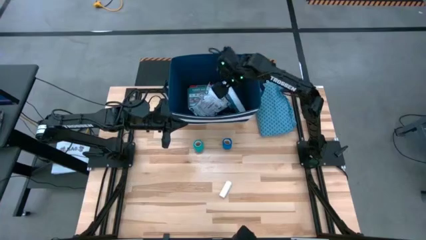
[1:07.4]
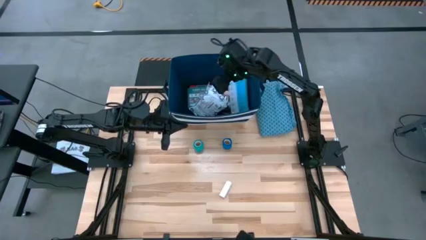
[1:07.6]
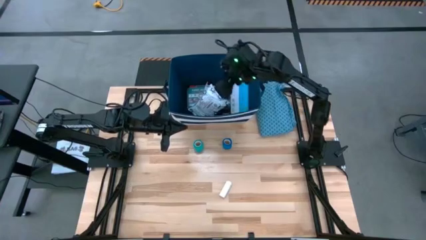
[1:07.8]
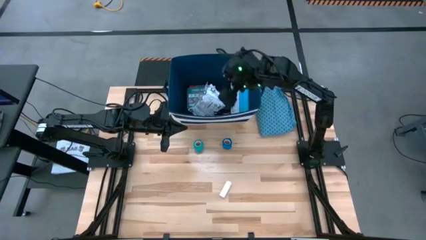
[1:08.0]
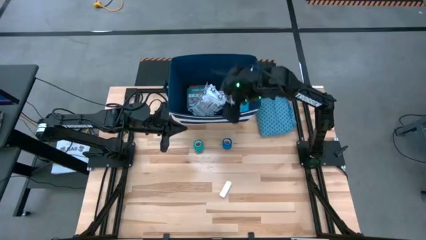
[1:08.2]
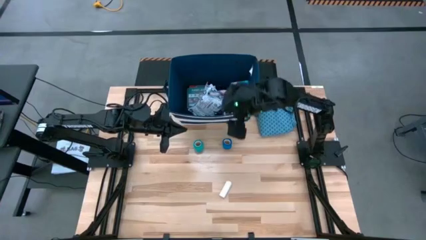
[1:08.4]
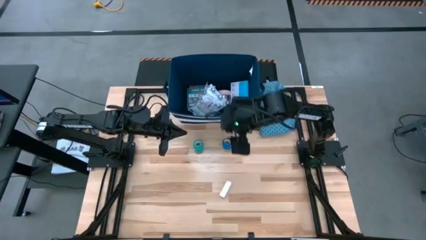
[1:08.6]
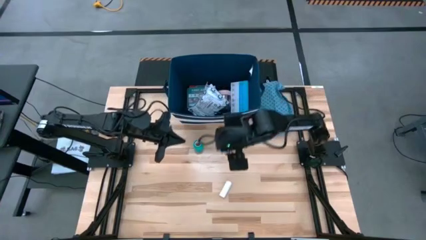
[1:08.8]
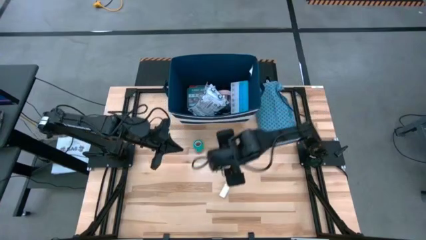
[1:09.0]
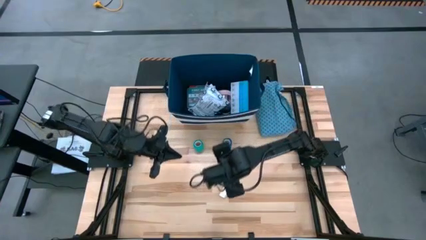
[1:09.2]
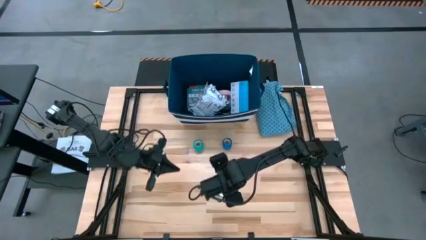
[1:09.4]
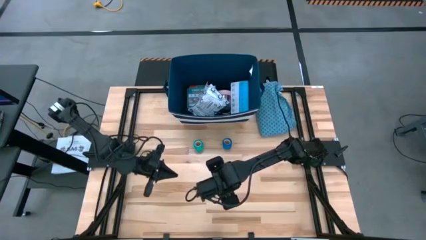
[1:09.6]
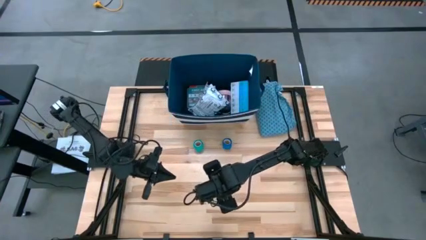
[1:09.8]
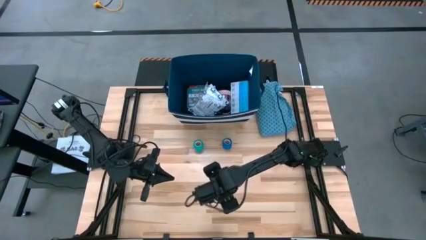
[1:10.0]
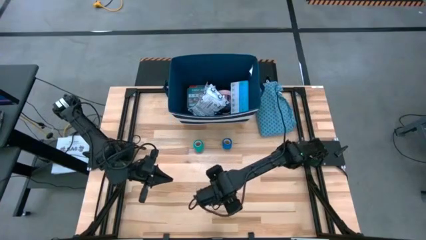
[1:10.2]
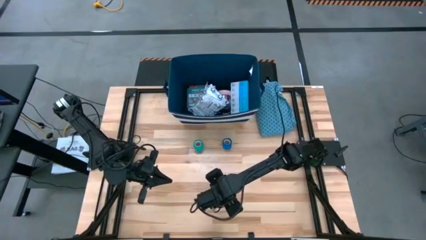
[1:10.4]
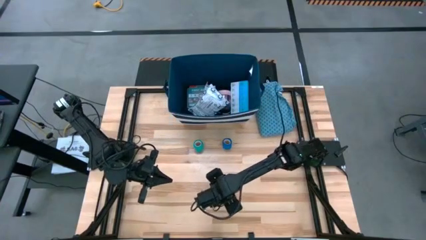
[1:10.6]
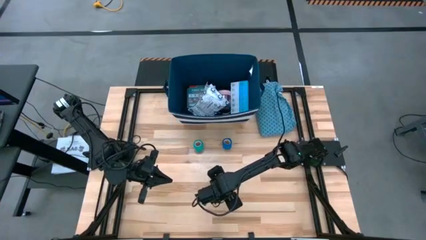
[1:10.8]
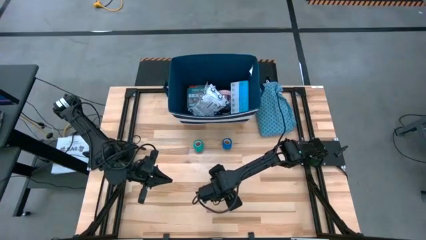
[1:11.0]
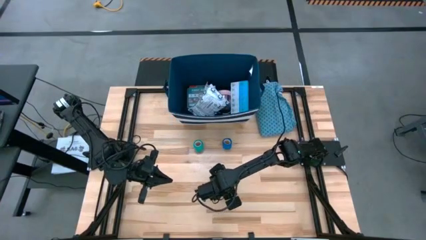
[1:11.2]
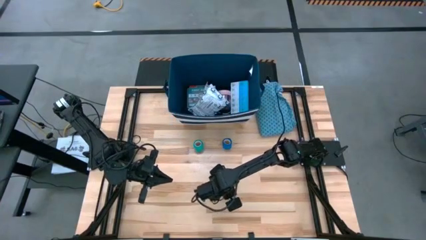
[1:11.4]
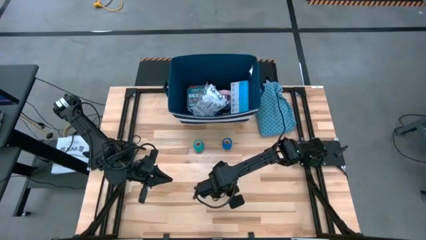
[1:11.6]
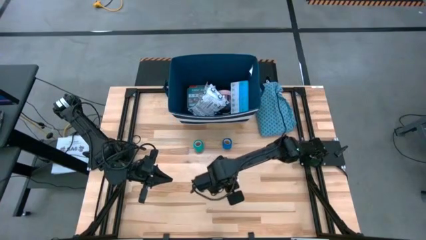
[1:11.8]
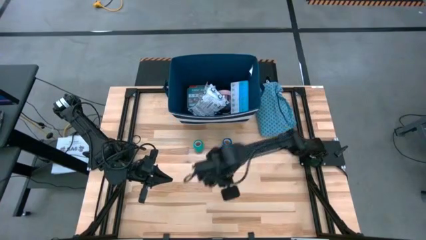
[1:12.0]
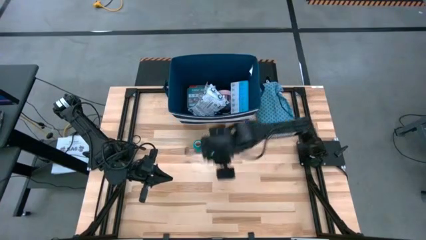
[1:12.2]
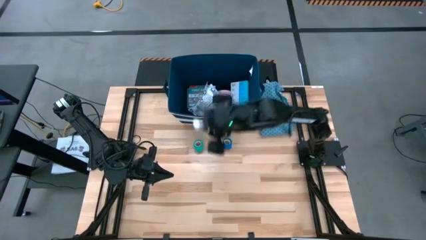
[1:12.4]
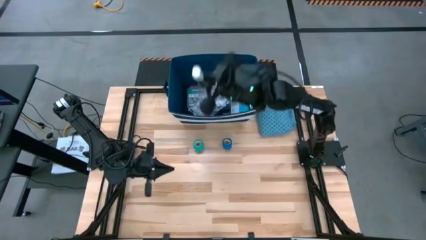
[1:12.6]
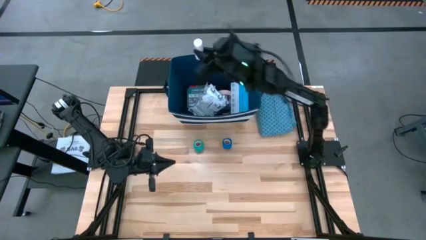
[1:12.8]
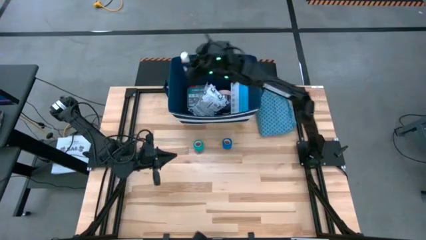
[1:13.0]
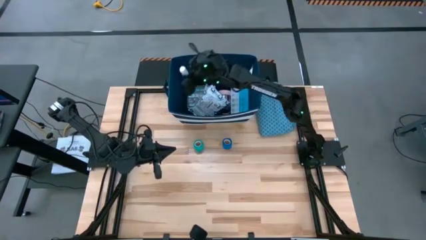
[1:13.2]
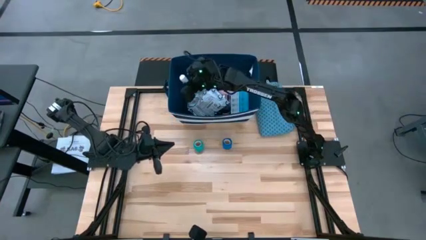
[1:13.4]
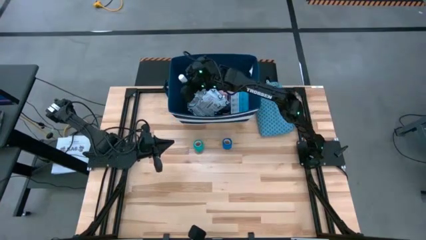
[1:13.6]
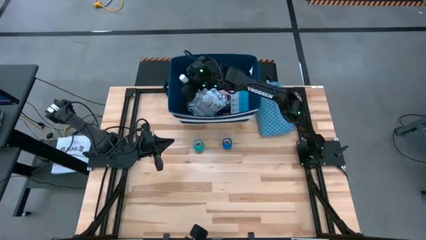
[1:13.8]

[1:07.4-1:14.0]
Task: Pick & place medical supplies in basket/bin
Put the gauze bandage into the bin

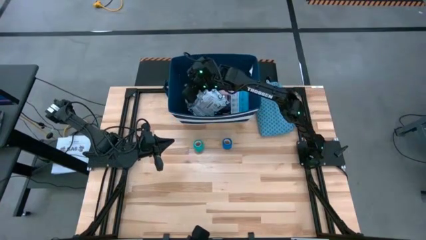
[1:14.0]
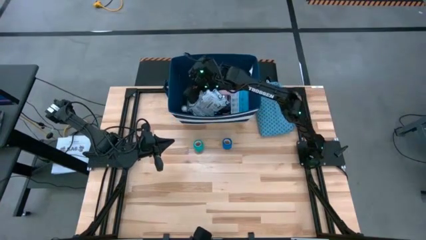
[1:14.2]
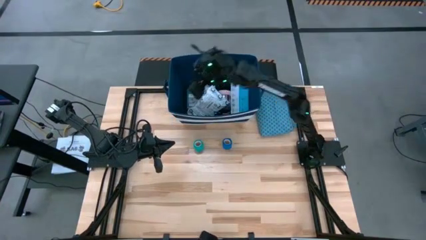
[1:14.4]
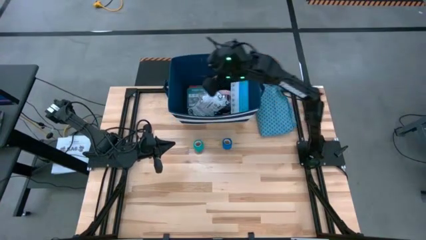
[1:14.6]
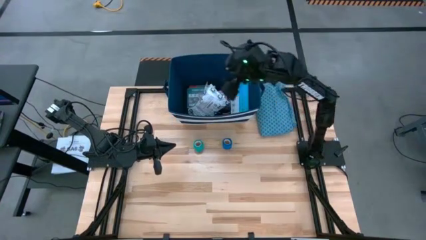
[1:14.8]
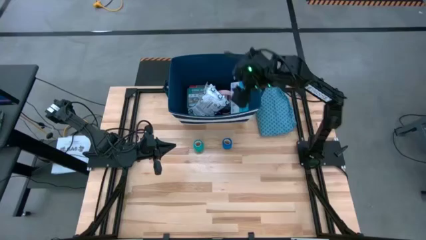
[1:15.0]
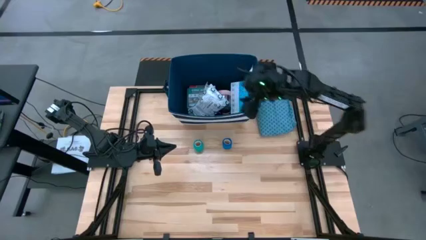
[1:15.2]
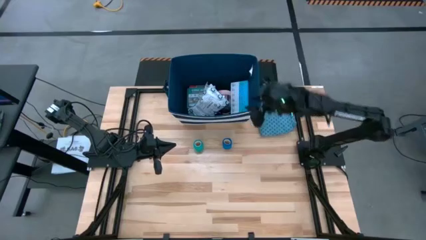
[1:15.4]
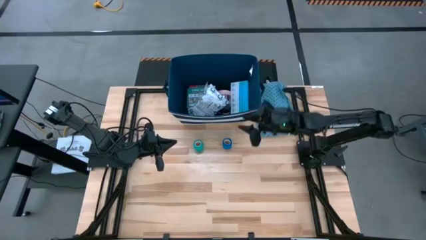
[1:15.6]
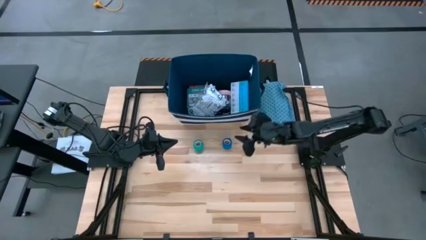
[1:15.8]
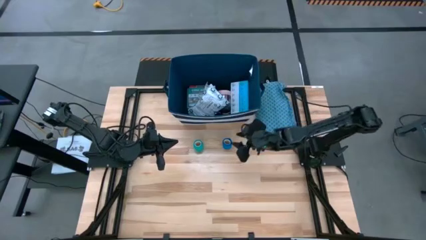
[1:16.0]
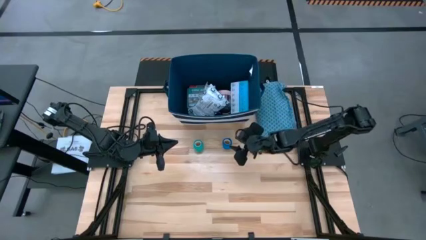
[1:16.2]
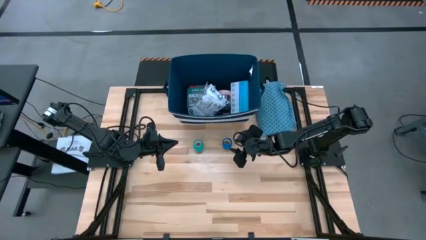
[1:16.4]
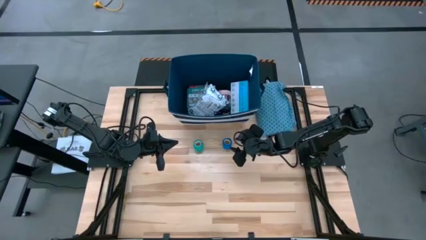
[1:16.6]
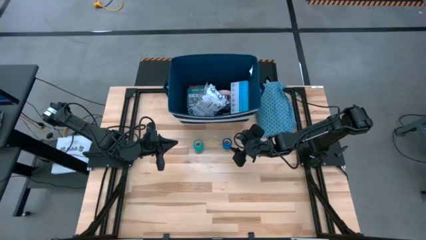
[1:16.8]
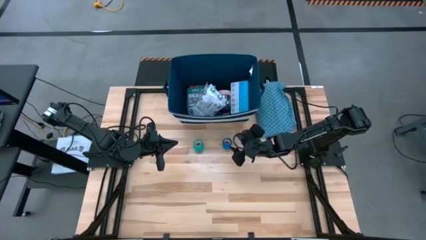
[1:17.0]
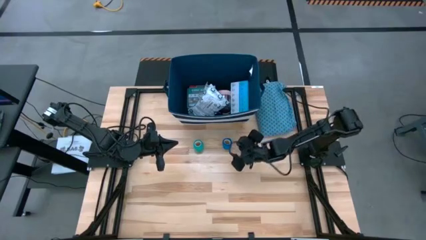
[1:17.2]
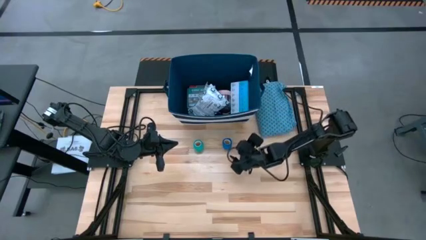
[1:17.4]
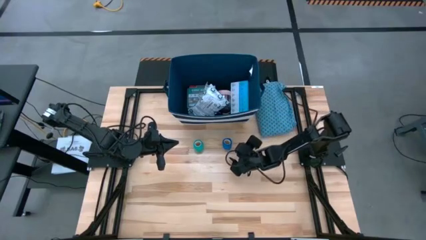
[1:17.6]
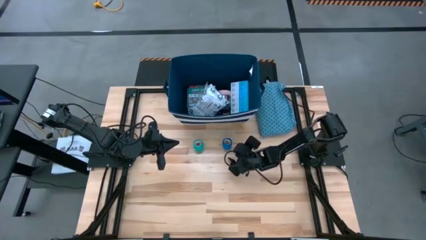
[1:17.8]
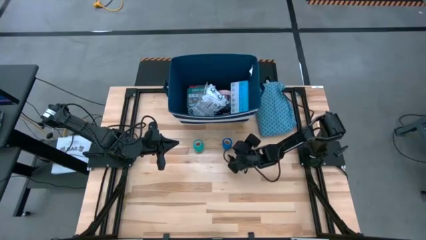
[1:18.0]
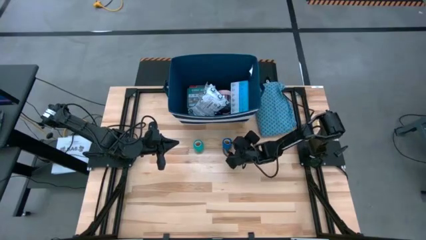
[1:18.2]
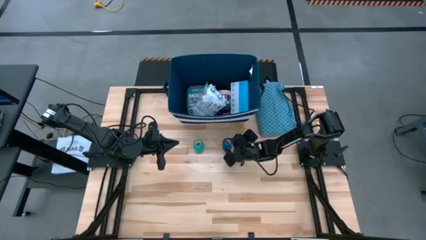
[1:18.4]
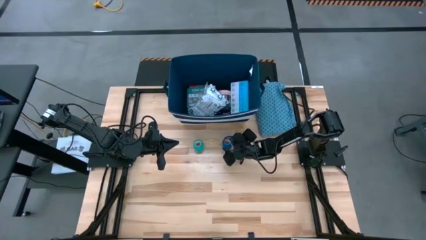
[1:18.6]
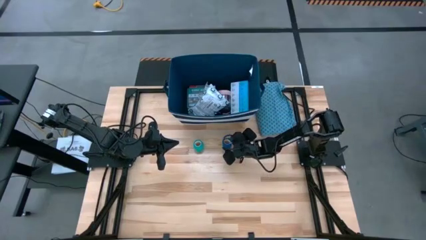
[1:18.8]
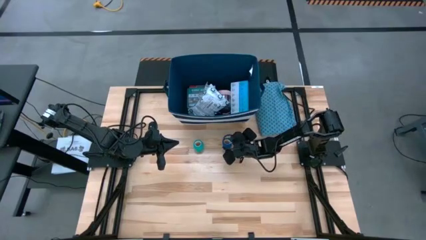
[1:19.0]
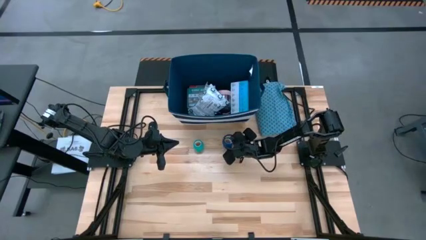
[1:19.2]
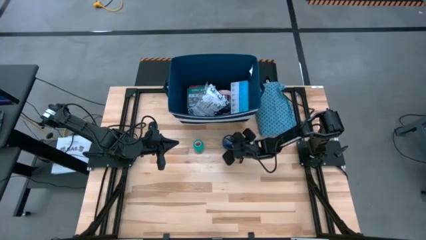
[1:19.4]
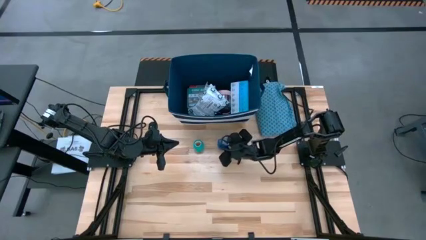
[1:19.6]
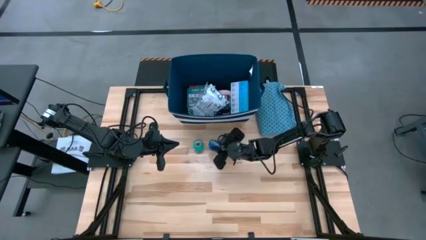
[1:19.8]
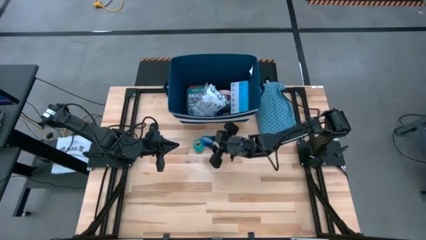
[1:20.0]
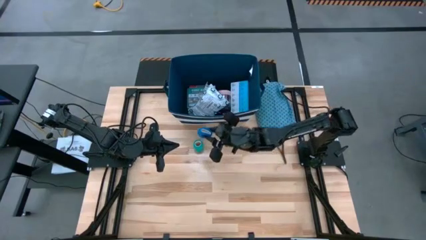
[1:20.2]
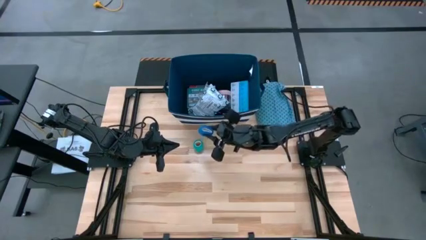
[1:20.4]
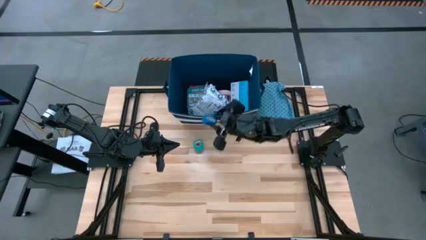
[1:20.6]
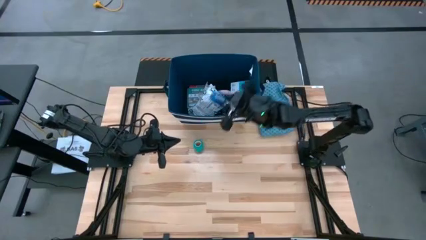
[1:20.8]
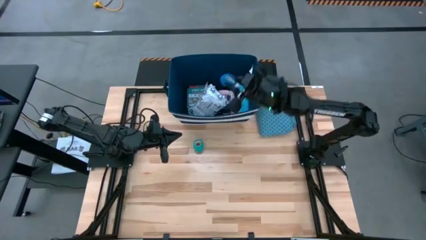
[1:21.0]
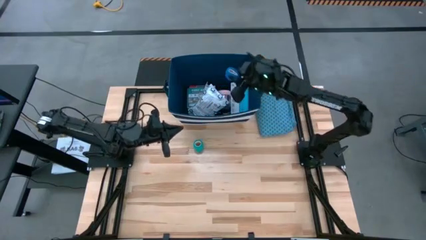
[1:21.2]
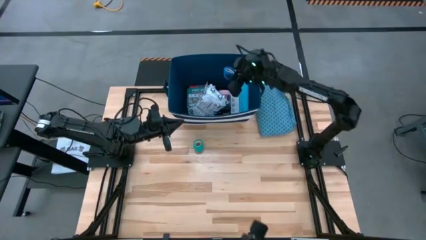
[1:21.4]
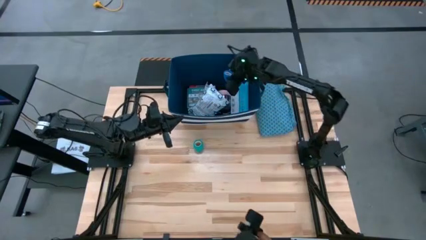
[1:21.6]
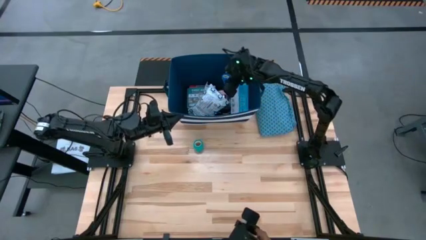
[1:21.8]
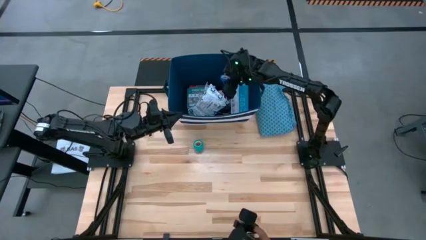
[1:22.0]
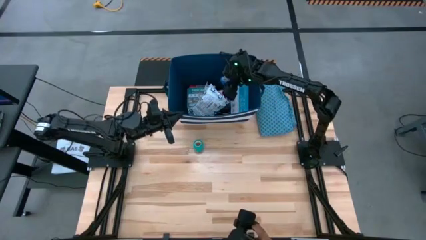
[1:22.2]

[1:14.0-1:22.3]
Put the blue rolled bandage into the bin
